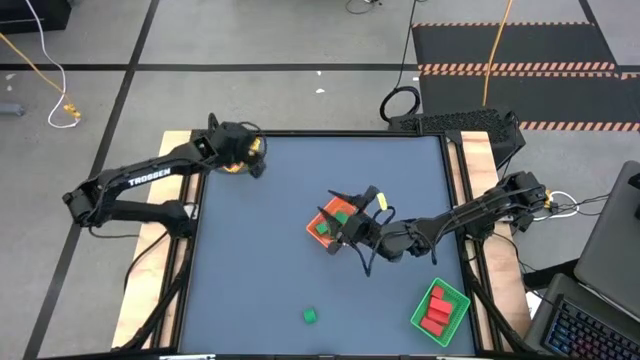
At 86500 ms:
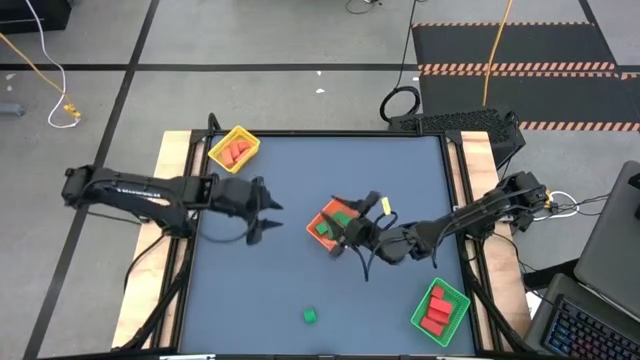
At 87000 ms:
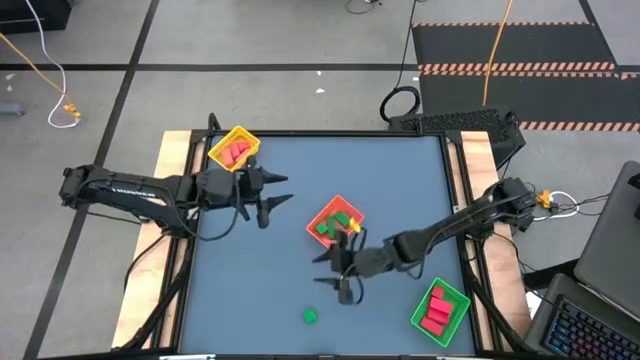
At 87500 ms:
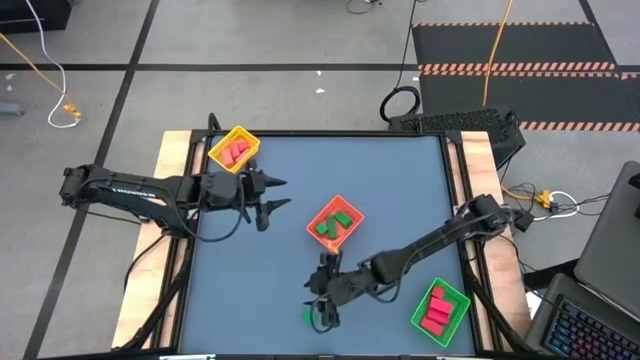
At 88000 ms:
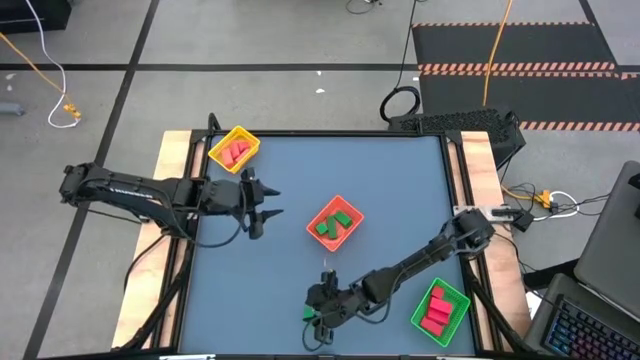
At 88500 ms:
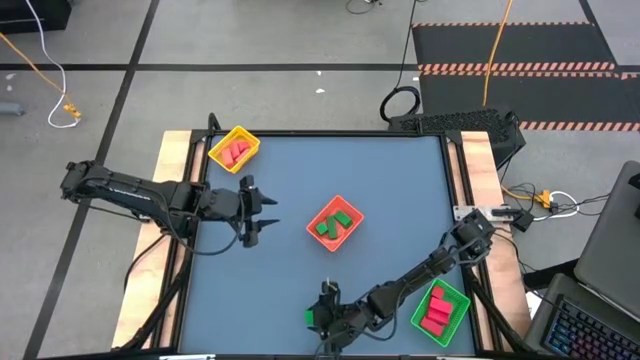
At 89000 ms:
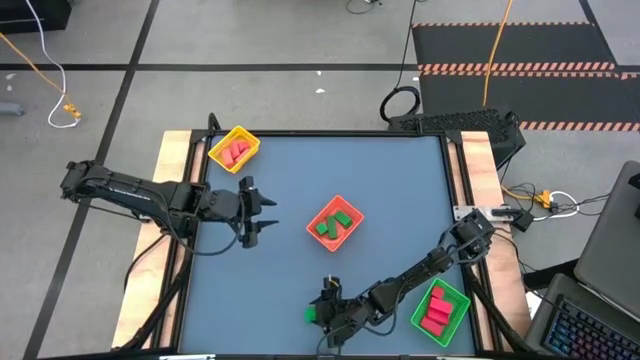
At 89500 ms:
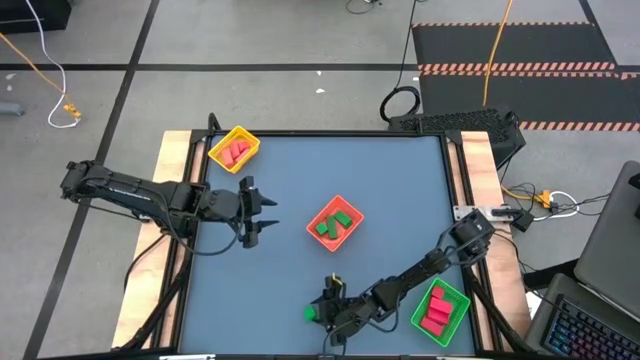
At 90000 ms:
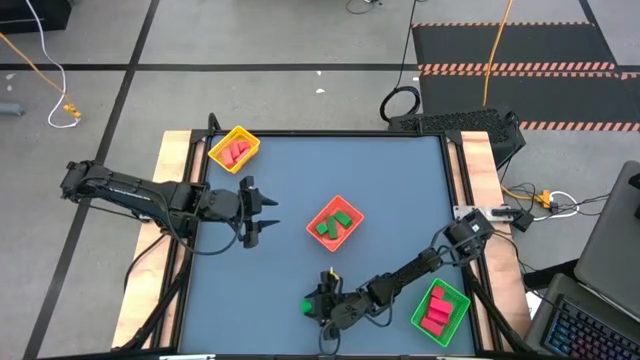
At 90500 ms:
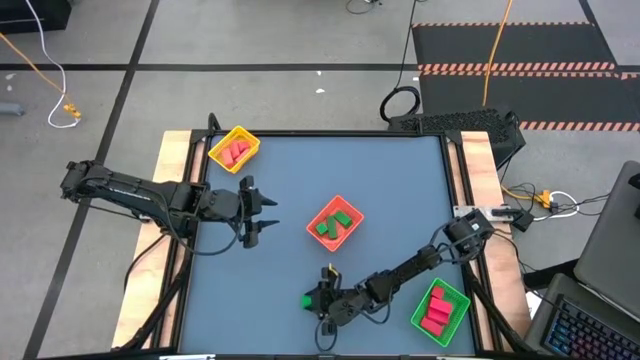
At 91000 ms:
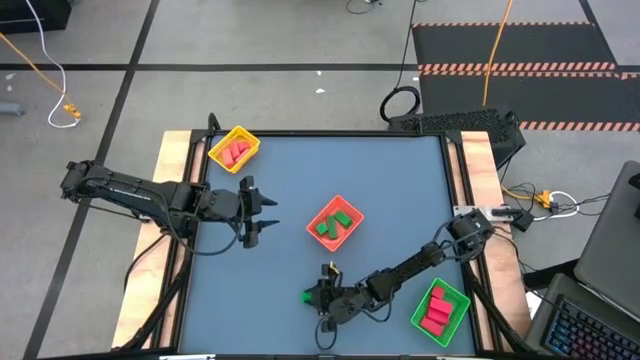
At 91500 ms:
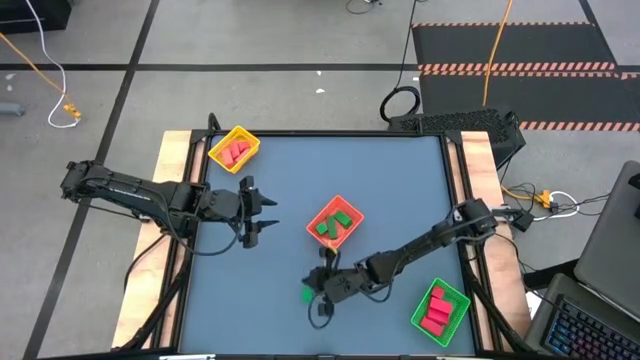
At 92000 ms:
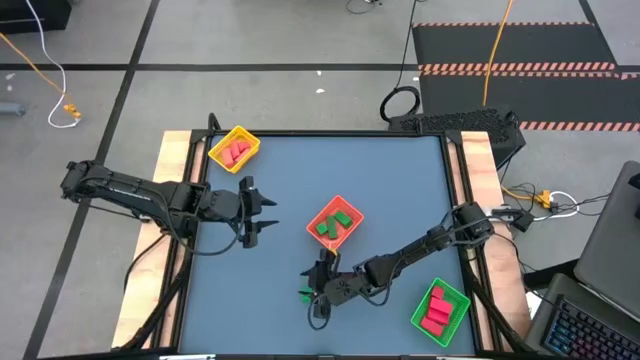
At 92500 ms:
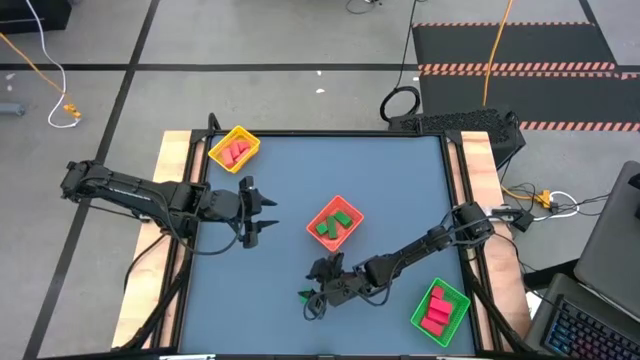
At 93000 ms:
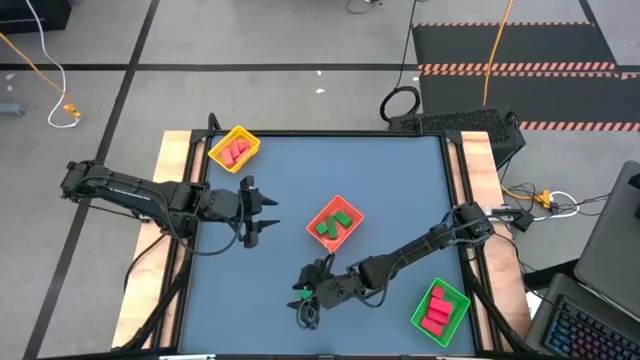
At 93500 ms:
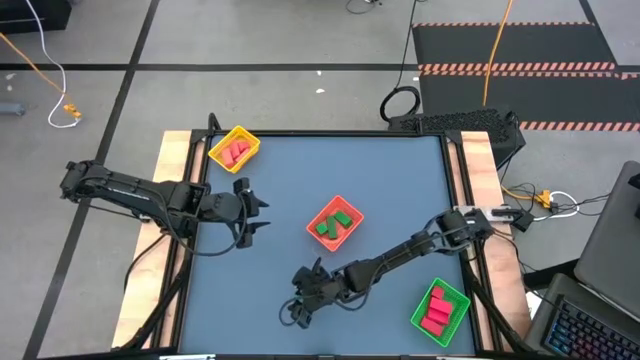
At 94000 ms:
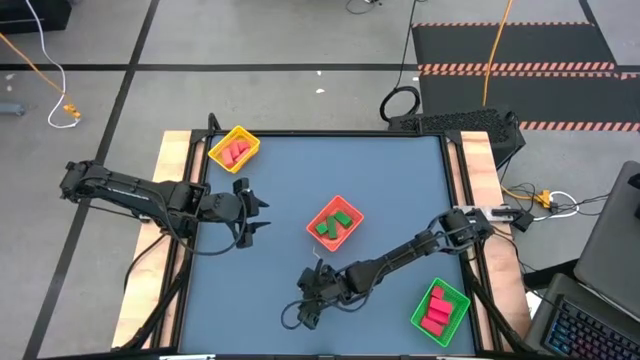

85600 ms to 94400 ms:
Task: Sort & place blocks by color
Put the green block into the orange bin

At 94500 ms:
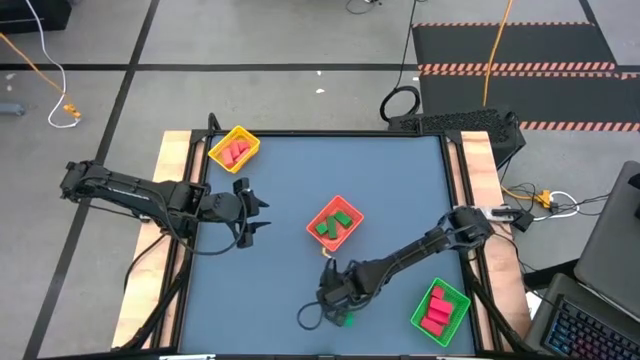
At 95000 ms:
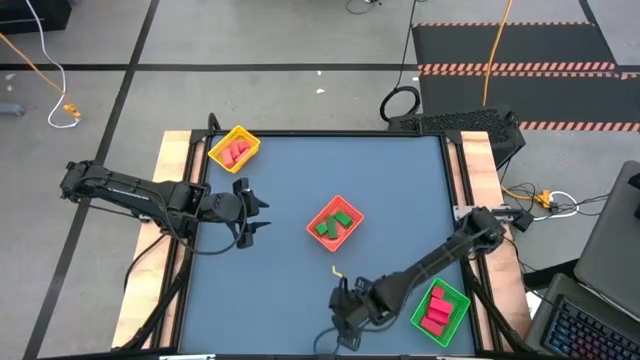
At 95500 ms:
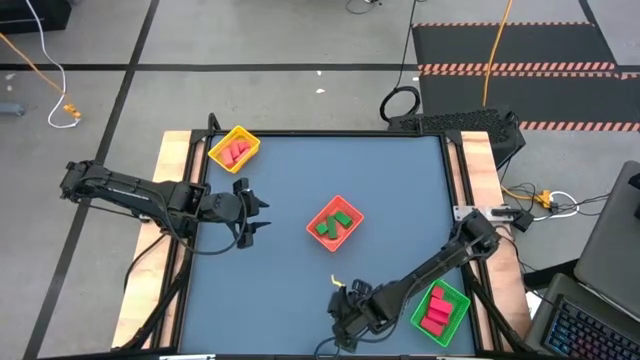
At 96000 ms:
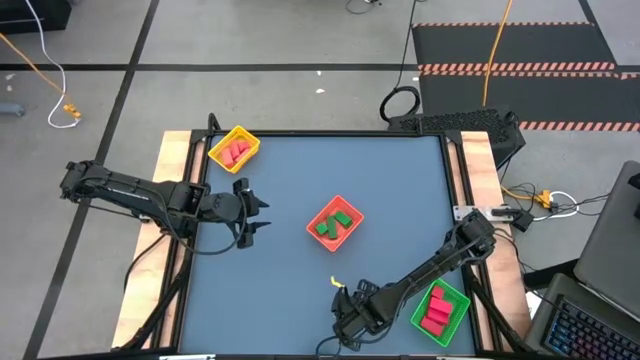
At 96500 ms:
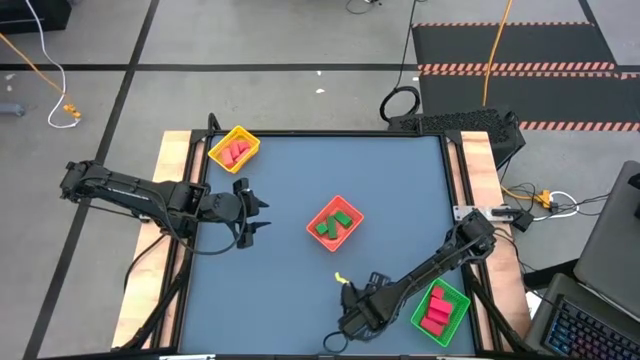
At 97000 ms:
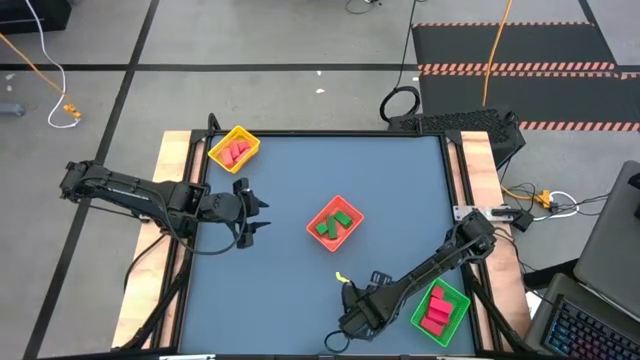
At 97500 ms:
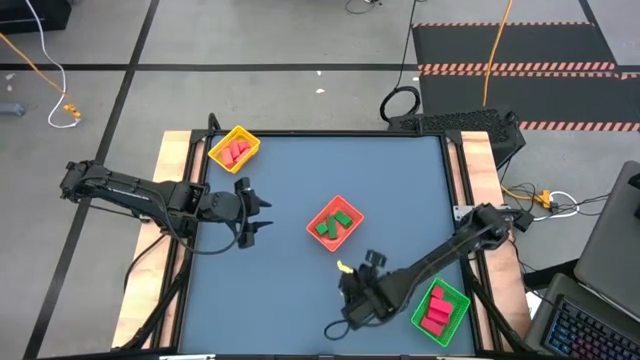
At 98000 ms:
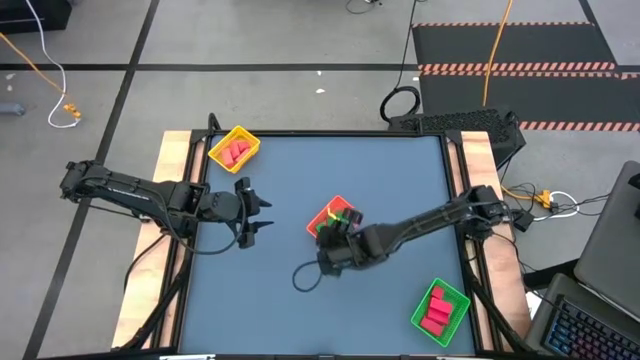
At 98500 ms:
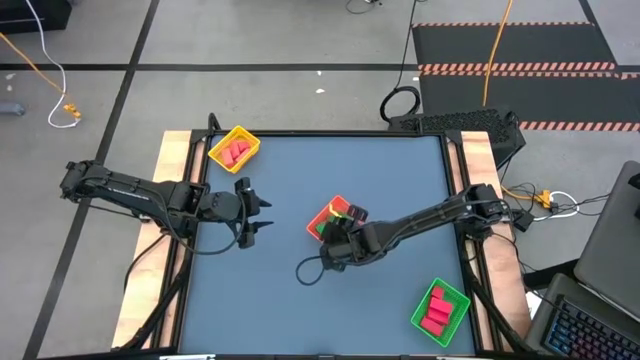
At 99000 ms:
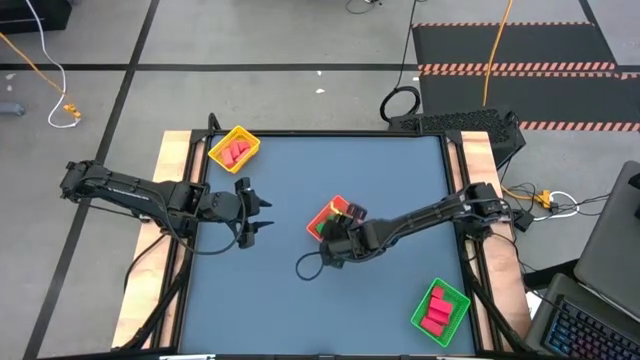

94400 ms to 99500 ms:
Put the green block into the orange bin

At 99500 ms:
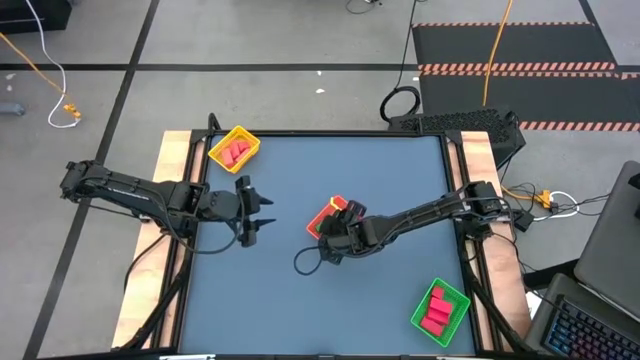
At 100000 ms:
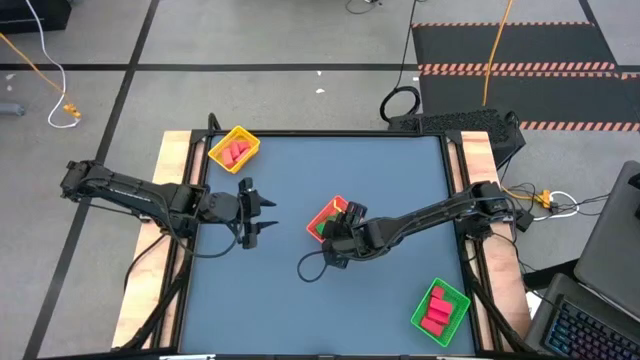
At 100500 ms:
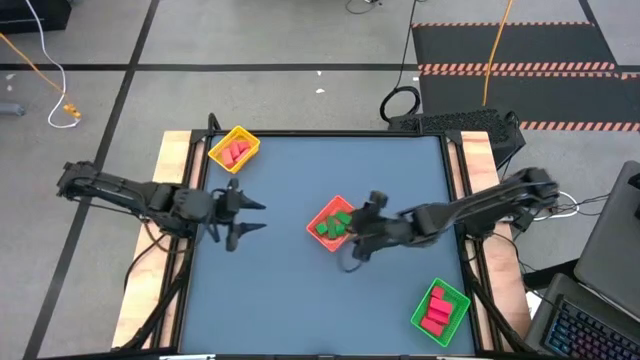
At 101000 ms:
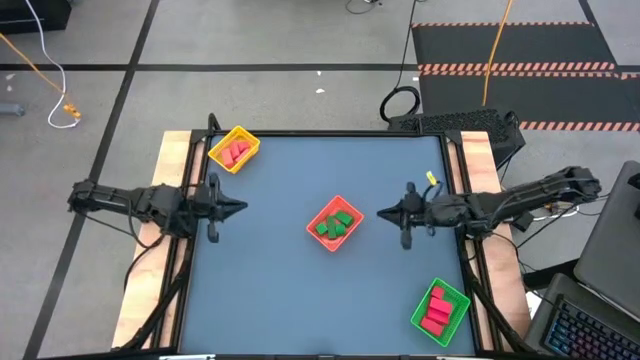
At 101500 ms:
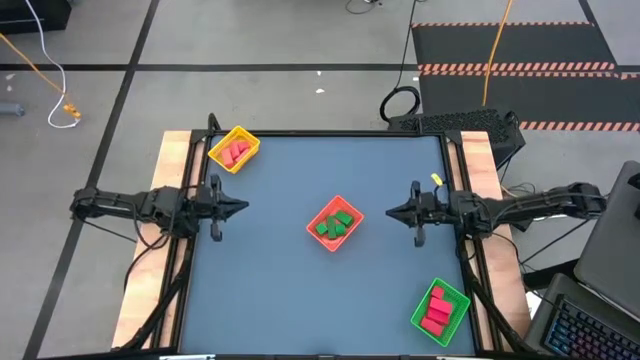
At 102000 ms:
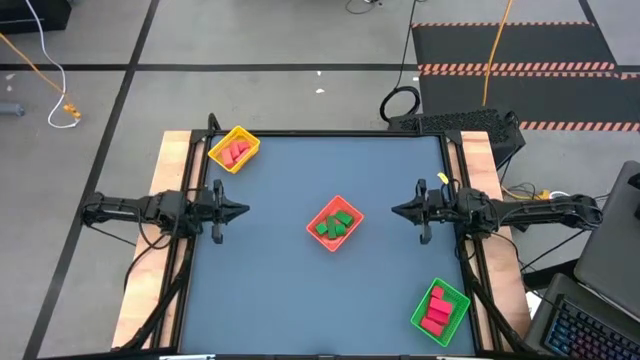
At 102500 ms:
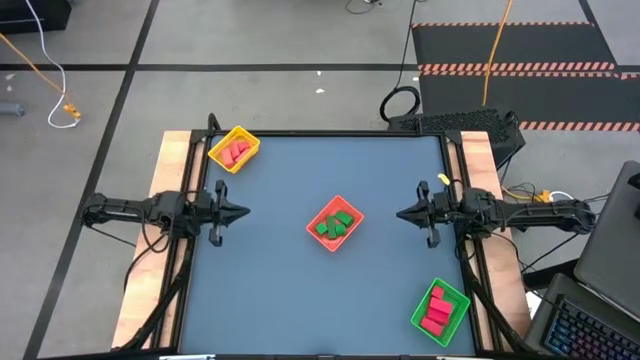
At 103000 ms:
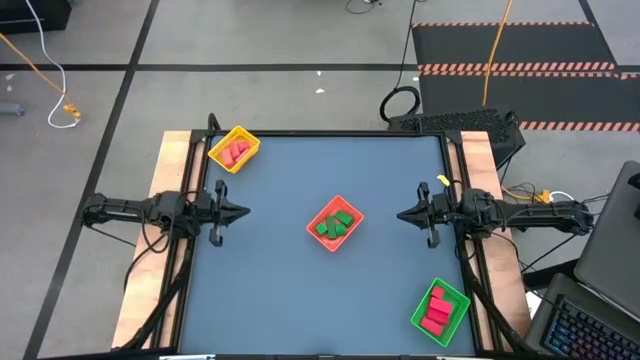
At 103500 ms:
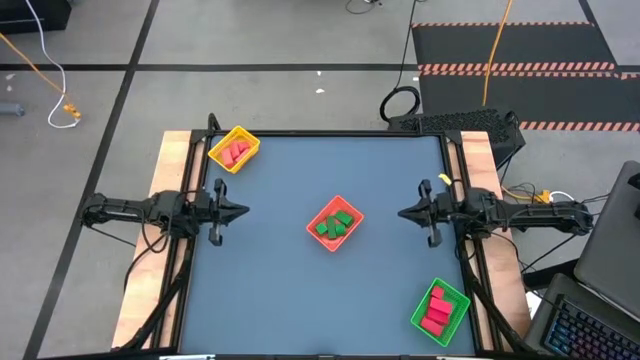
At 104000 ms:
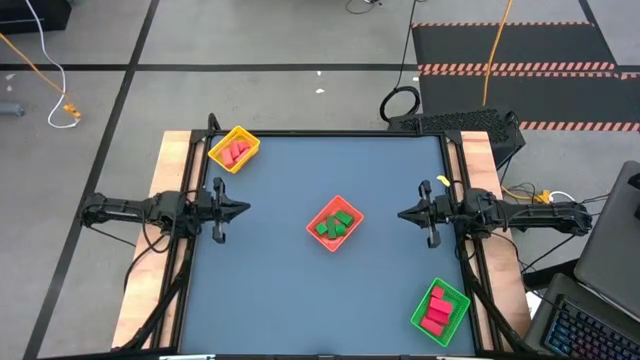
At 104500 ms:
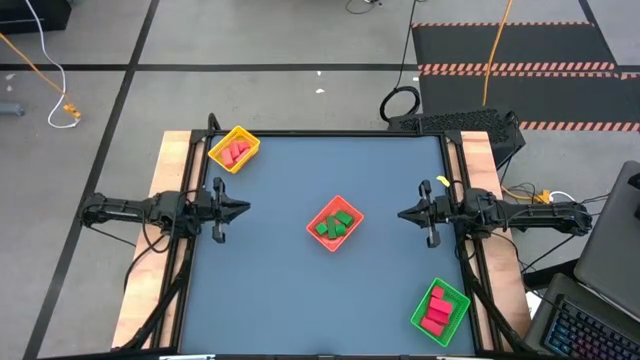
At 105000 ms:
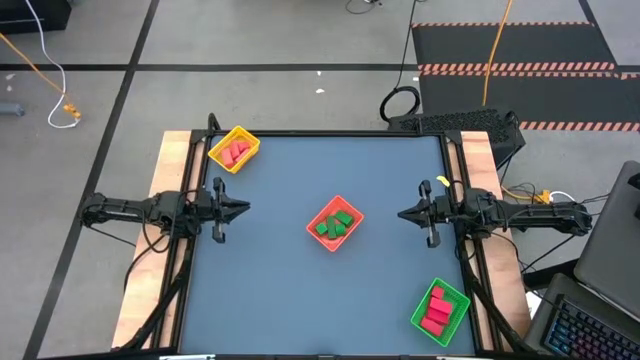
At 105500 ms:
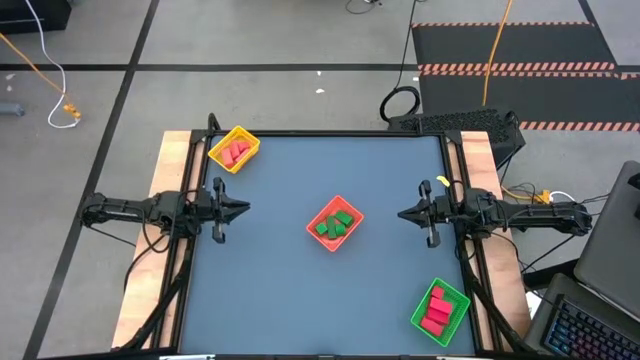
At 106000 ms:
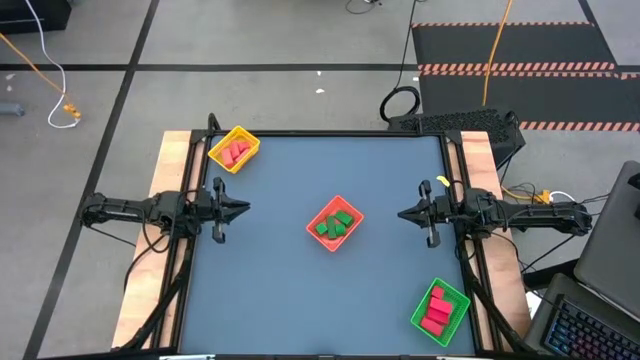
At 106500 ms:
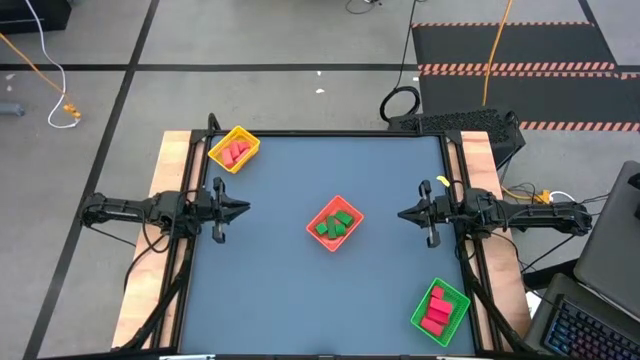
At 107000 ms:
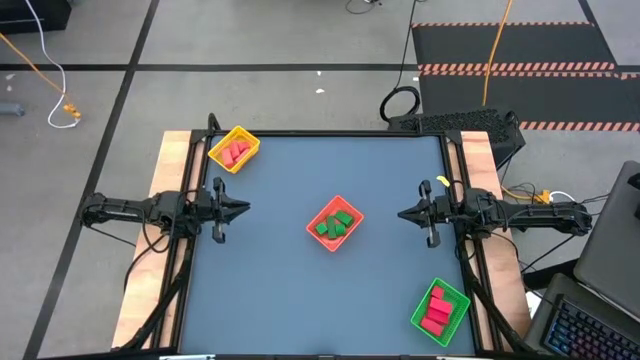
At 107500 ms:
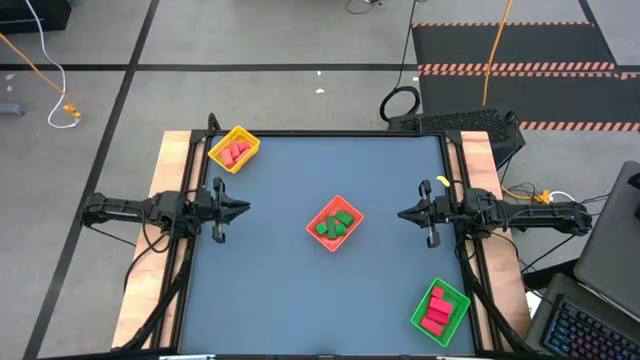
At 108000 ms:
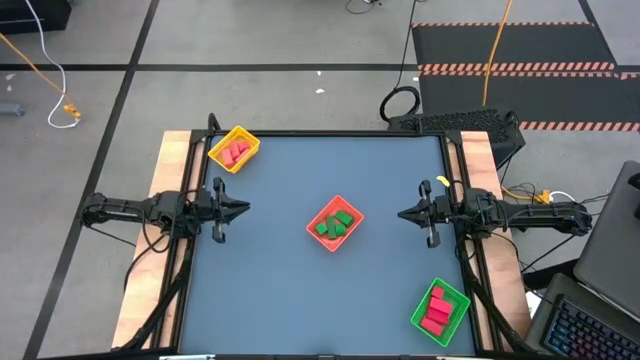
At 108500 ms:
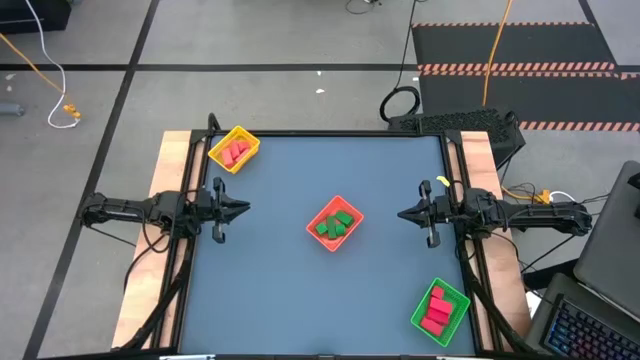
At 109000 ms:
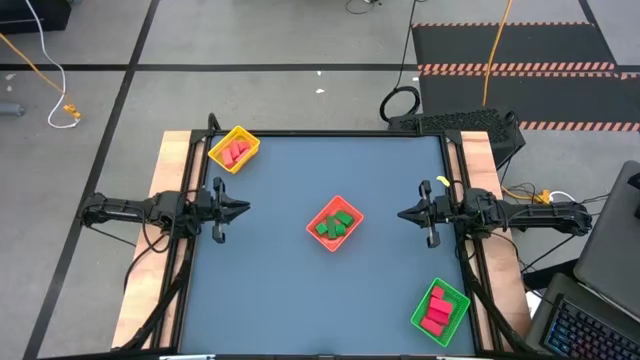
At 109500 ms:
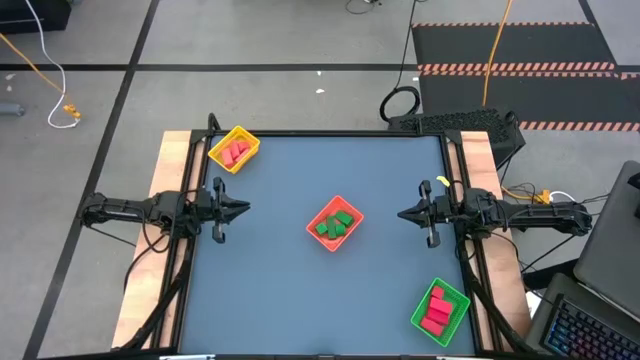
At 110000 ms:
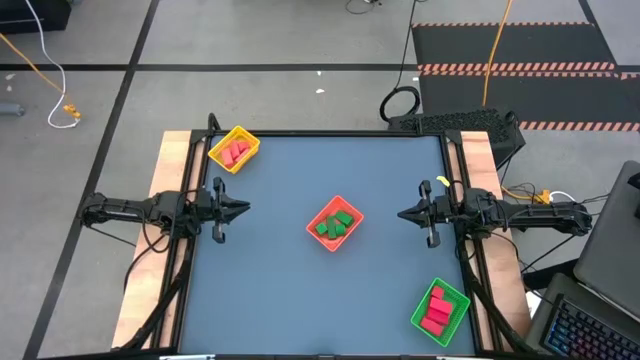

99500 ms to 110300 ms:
Return to Home Position
